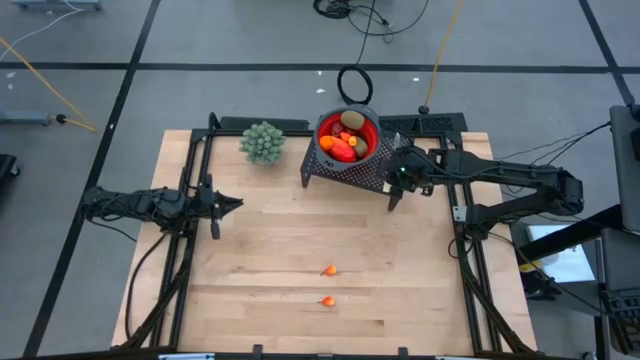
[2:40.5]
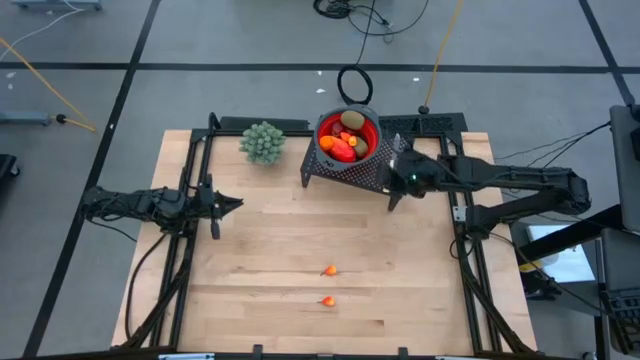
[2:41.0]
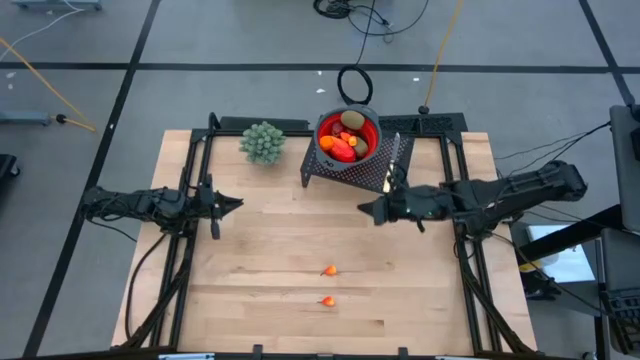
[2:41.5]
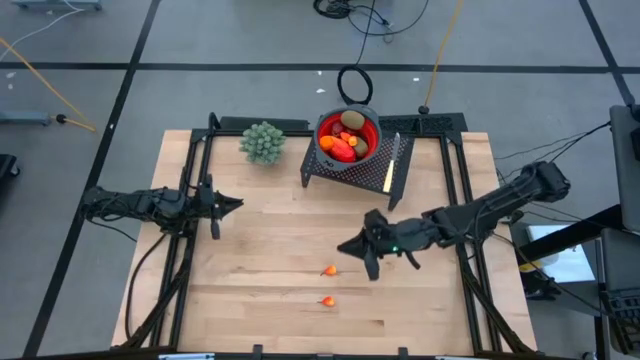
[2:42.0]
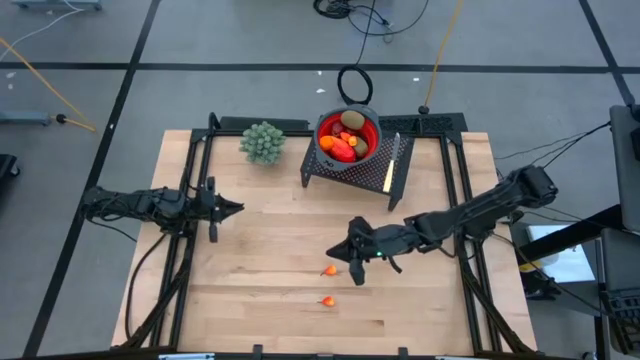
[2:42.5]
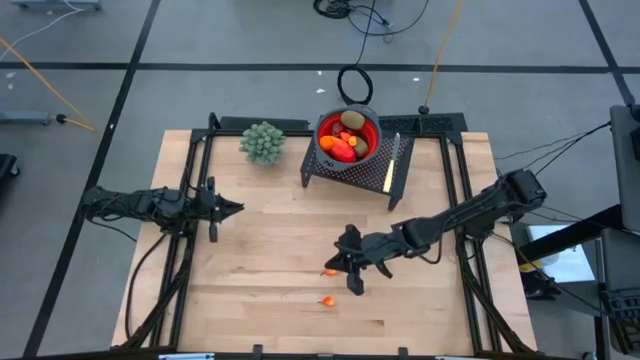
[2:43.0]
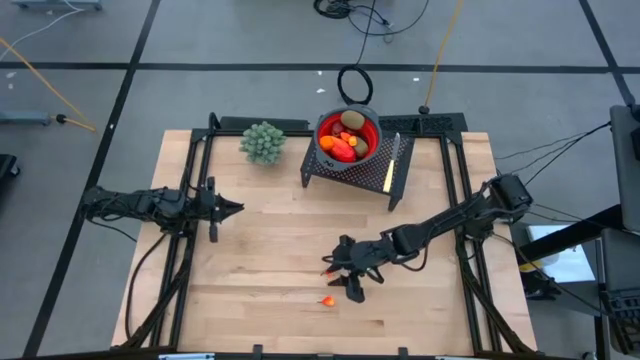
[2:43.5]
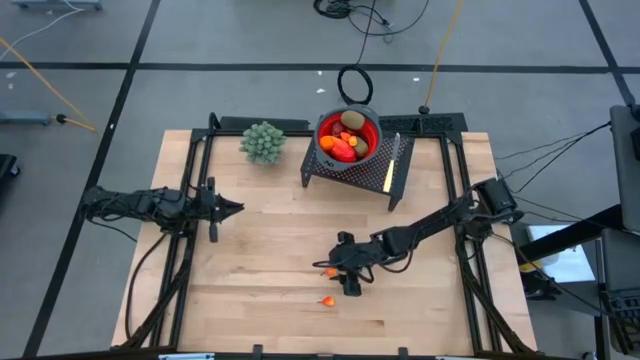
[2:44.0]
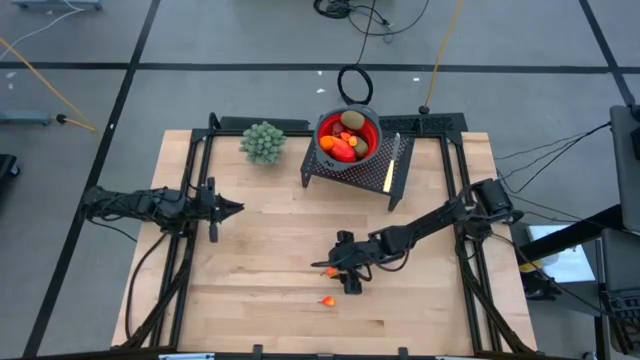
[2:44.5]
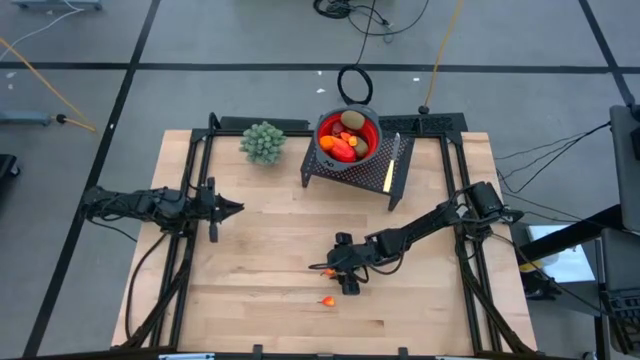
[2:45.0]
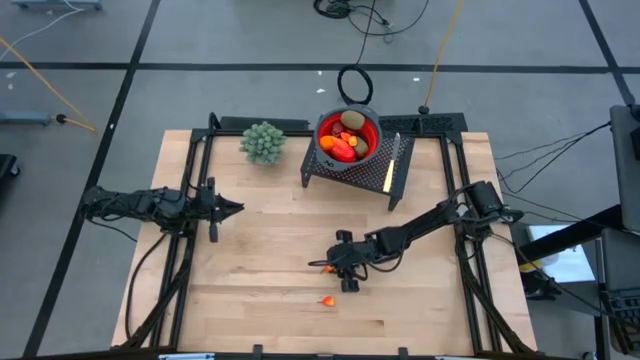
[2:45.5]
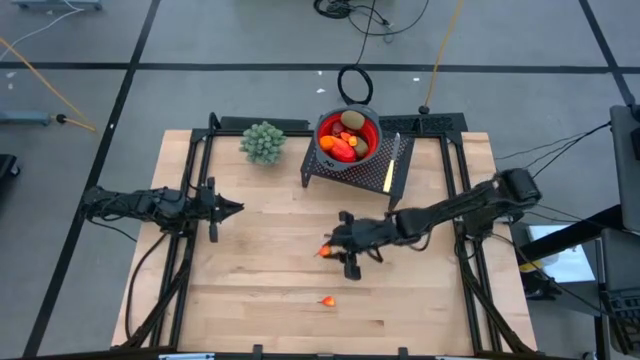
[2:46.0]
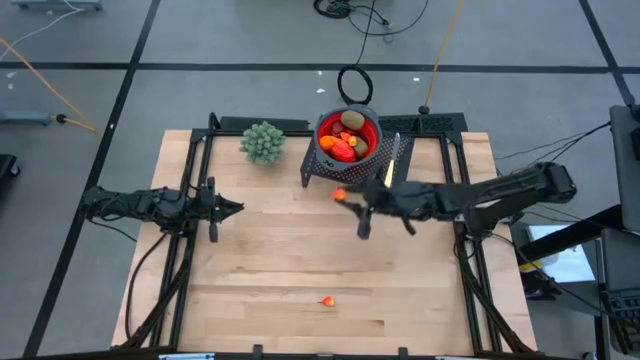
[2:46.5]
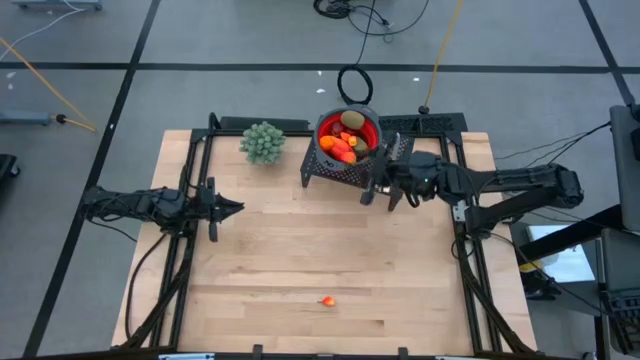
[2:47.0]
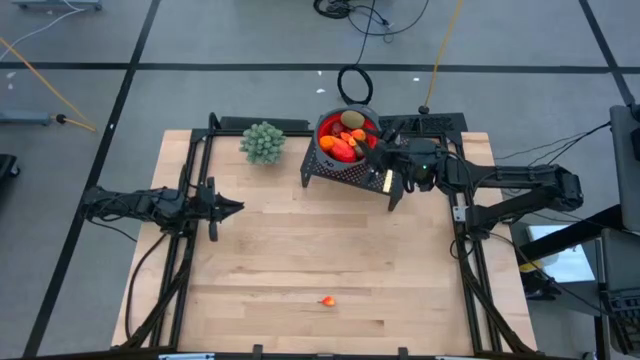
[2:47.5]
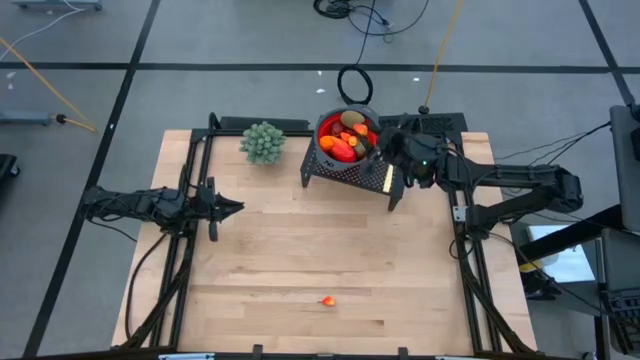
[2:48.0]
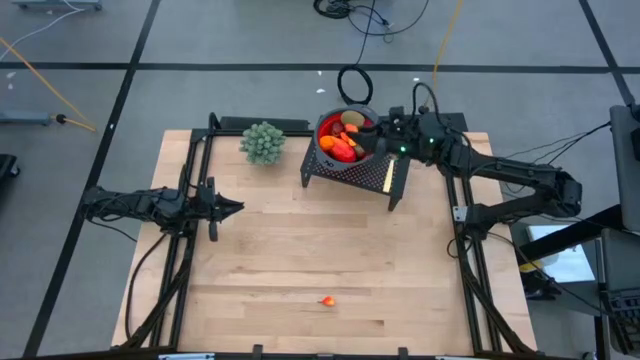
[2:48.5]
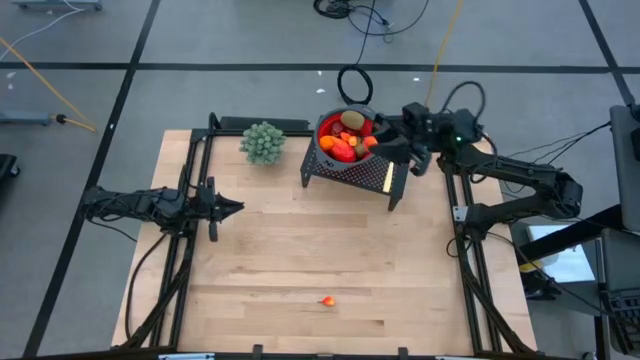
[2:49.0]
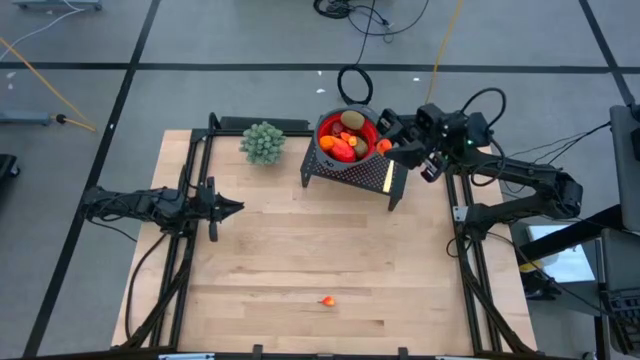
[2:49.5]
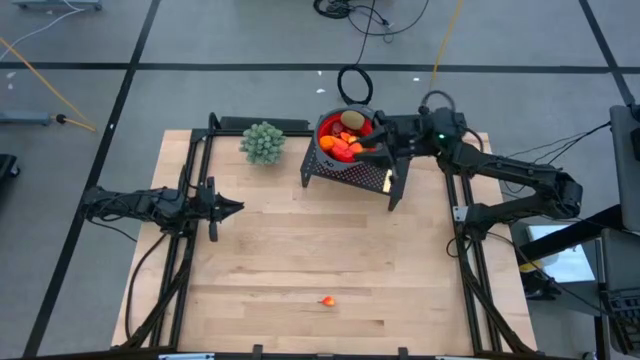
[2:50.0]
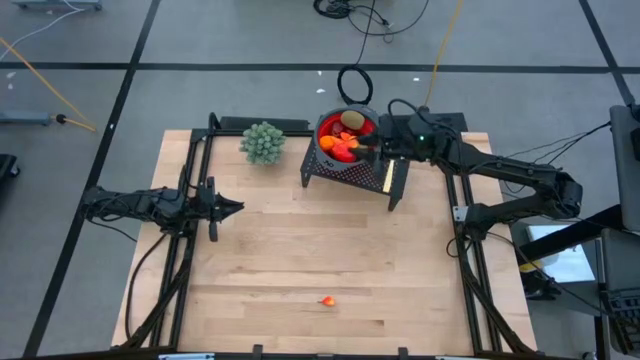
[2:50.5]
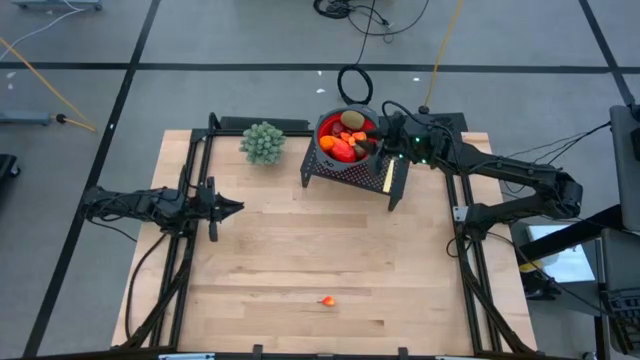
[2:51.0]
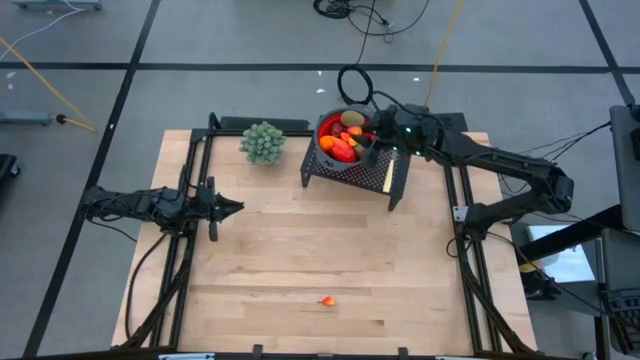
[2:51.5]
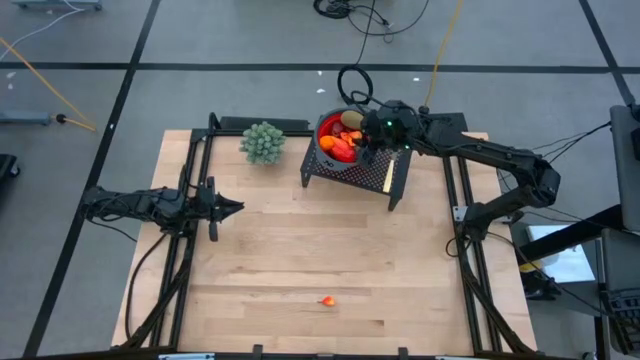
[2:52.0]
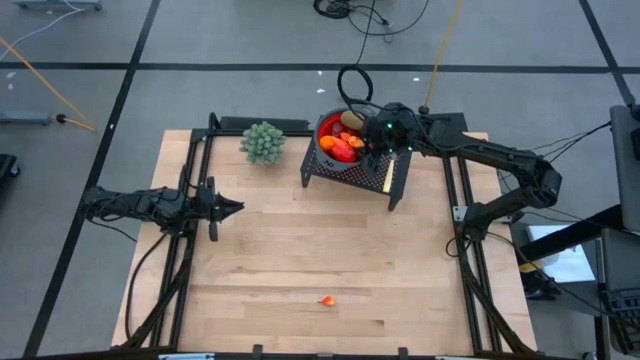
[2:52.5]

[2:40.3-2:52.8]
Task: Pick & Place Fruit
Put the orange pear into the red strainer bowl on the shelf

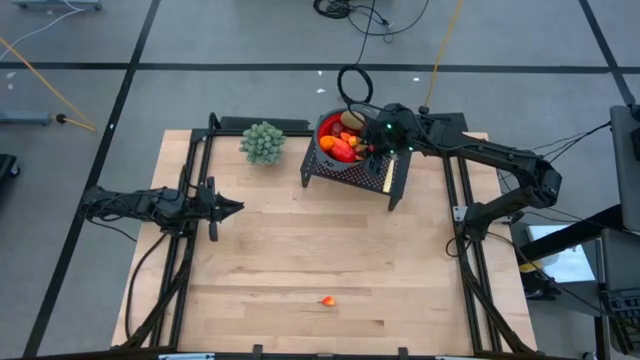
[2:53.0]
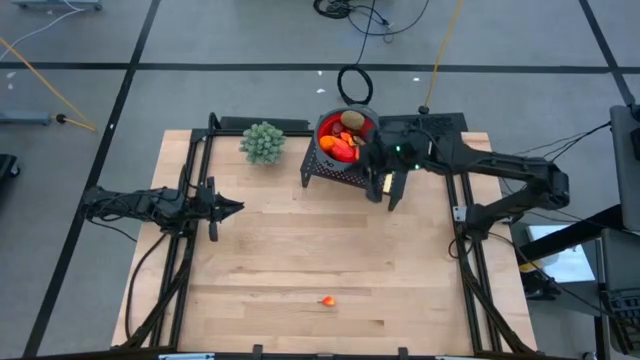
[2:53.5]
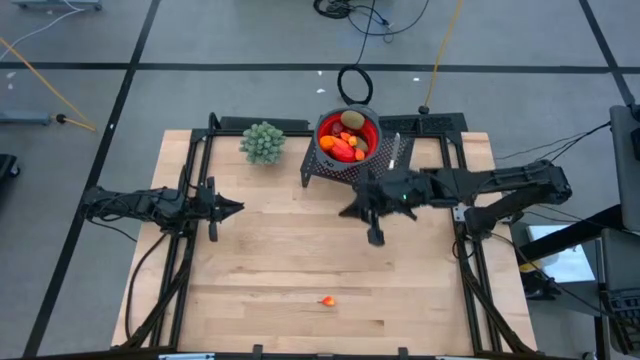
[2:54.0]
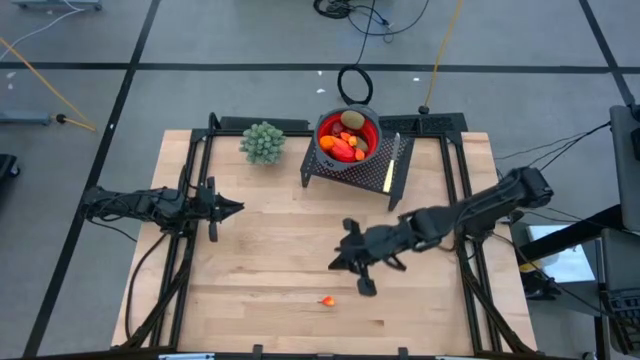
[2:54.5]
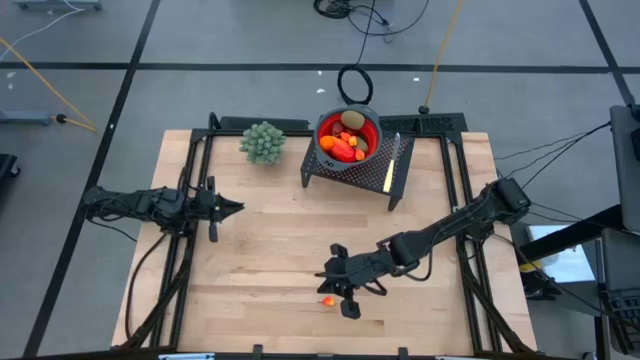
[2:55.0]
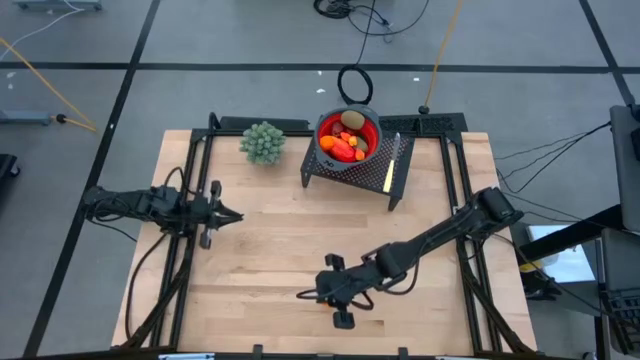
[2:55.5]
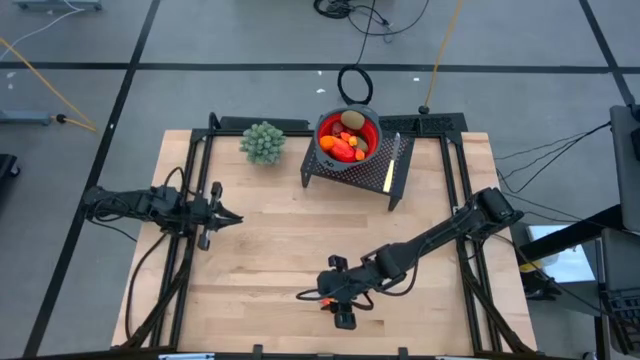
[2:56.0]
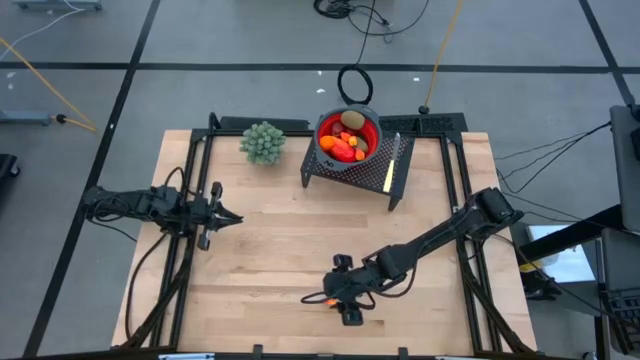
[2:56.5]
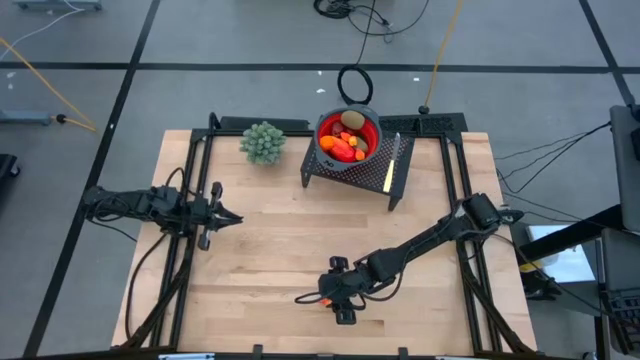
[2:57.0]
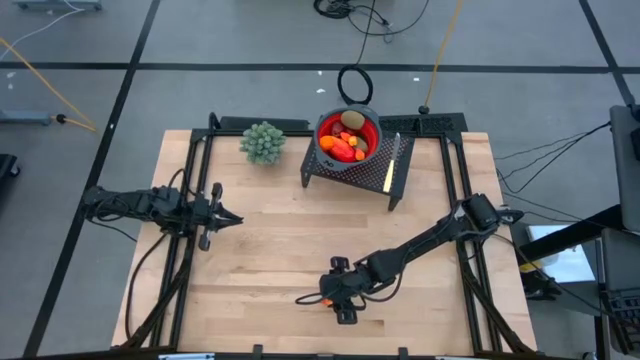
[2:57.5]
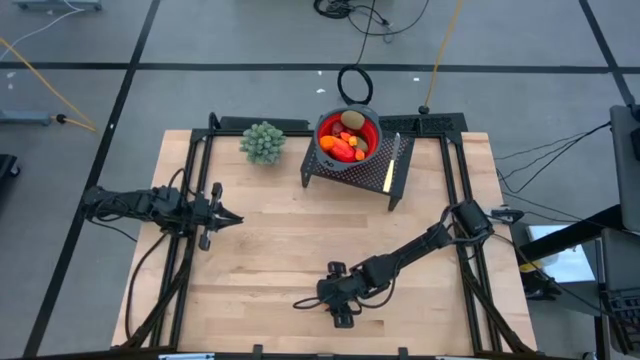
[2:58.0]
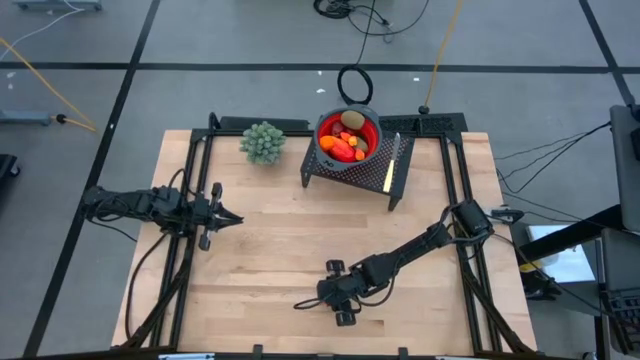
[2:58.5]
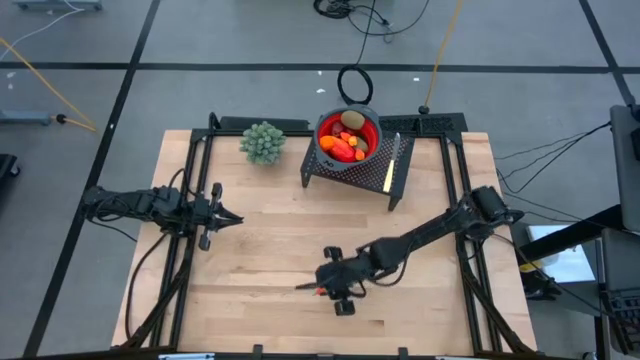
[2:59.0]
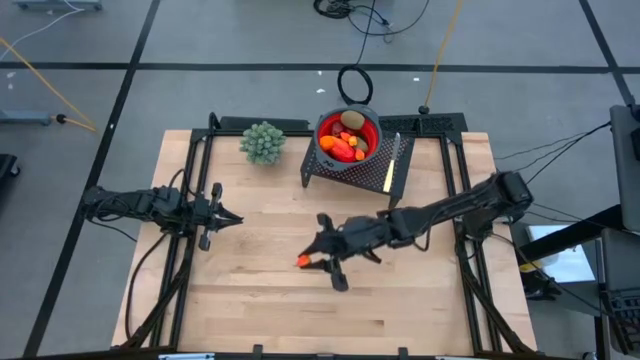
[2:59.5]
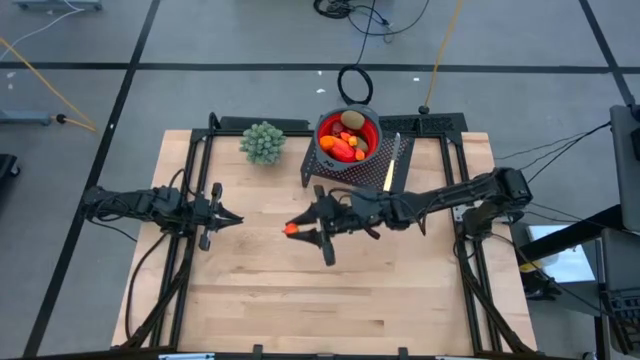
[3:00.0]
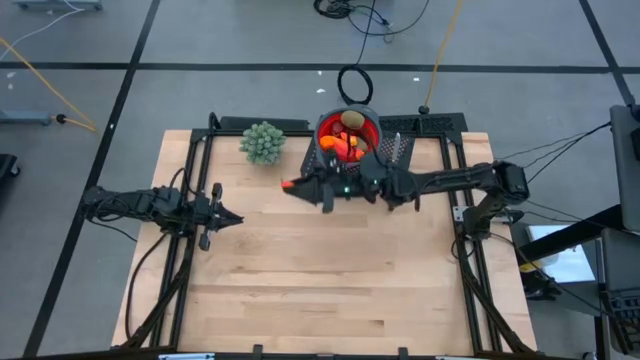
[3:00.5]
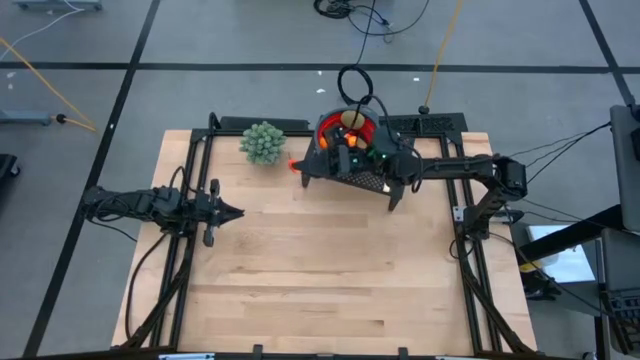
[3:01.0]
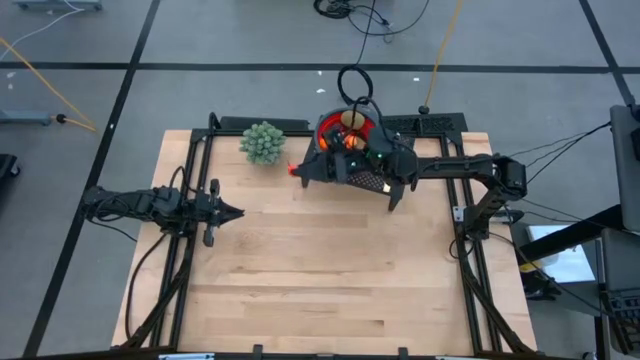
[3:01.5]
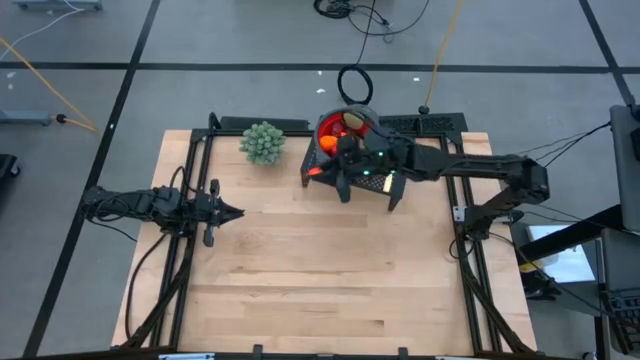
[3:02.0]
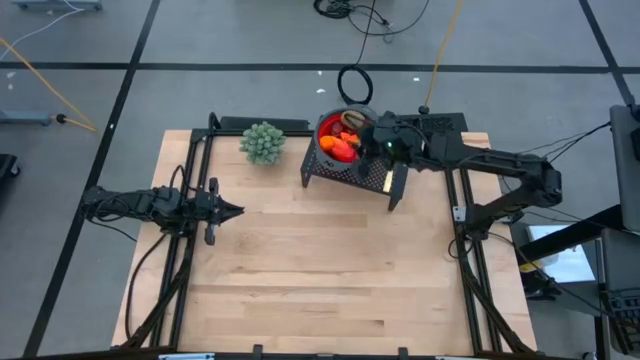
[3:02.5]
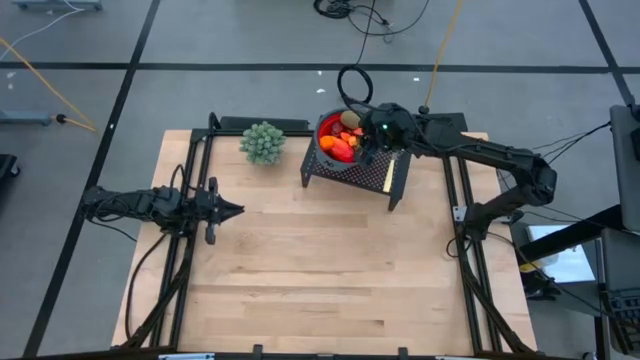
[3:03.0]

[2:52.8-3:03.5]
Put the orange pear into the red strainer bowl on the shelf
